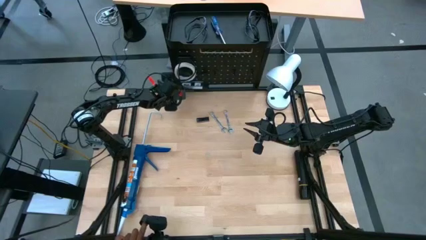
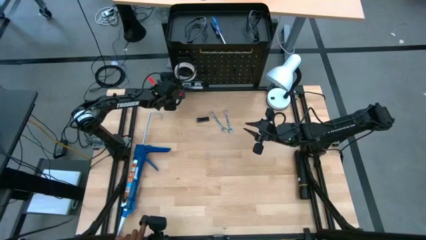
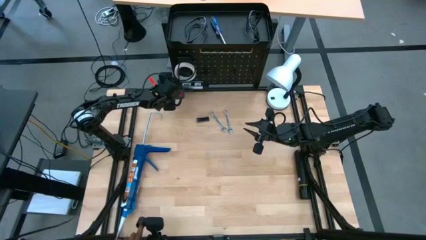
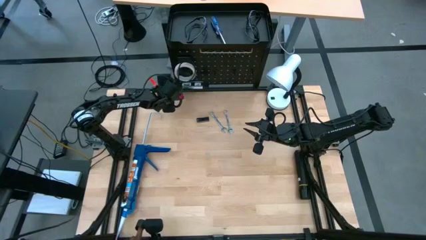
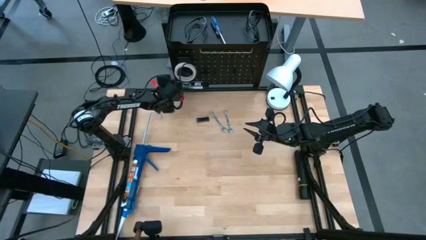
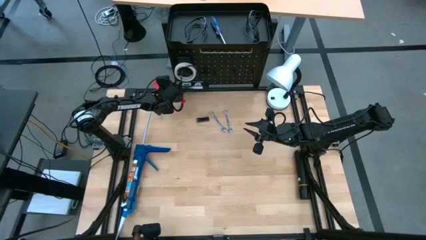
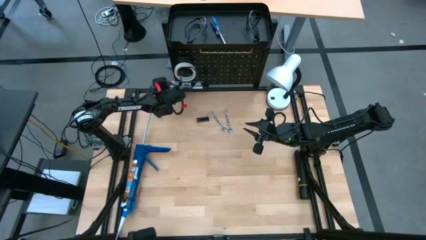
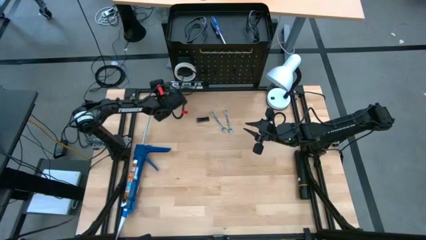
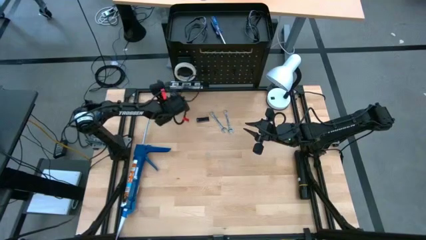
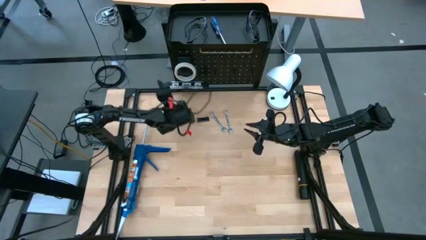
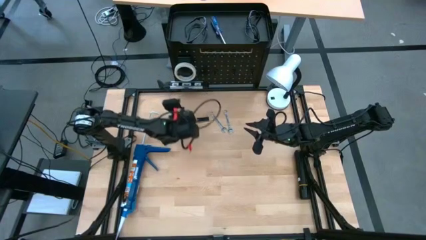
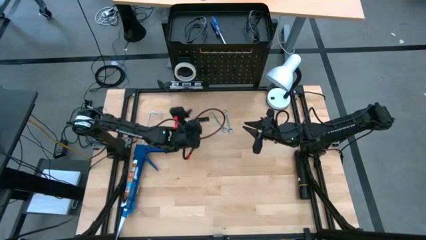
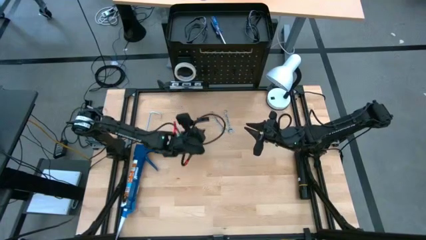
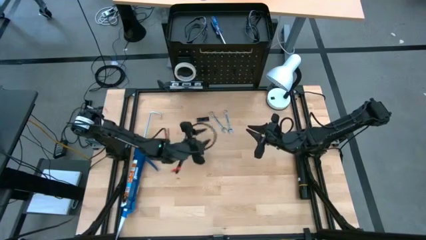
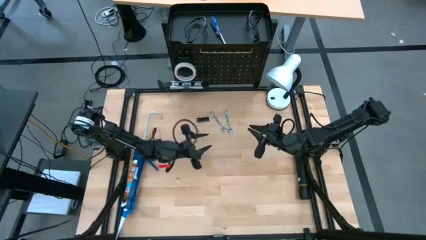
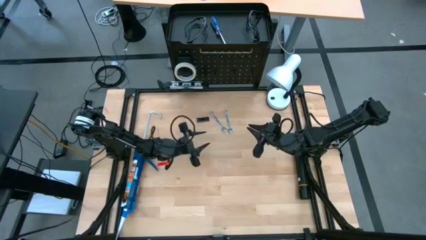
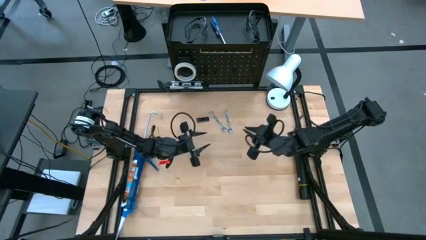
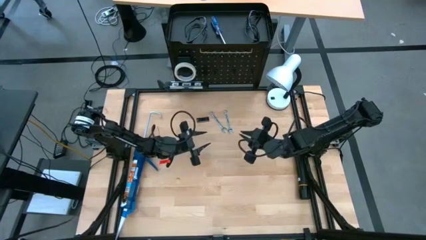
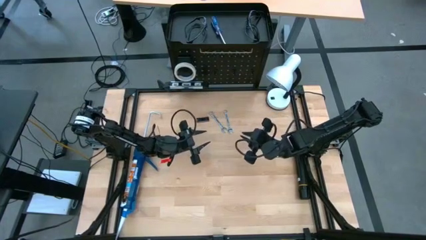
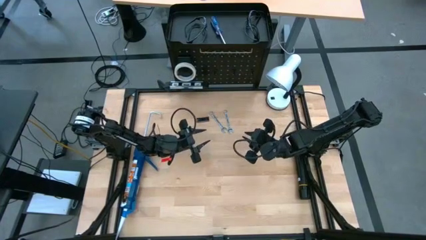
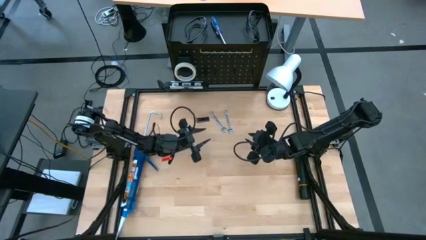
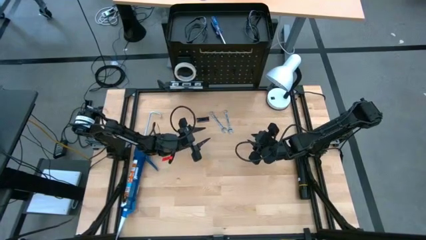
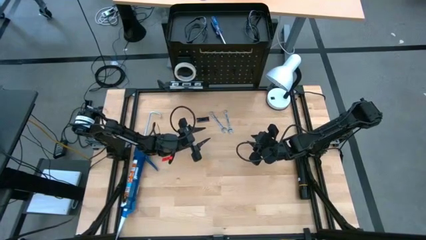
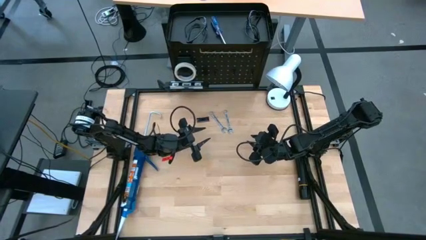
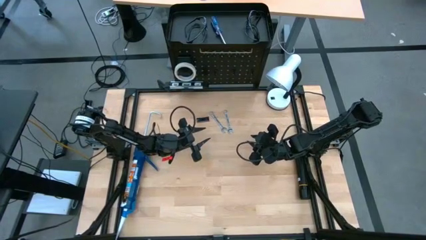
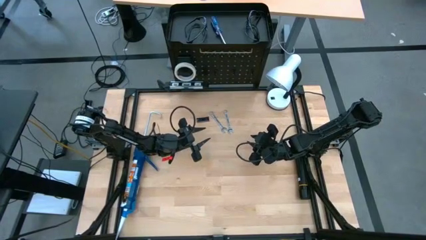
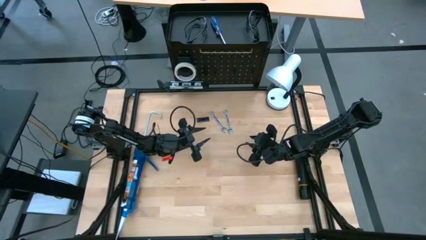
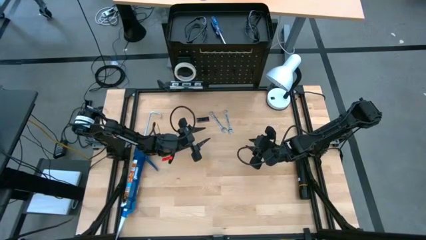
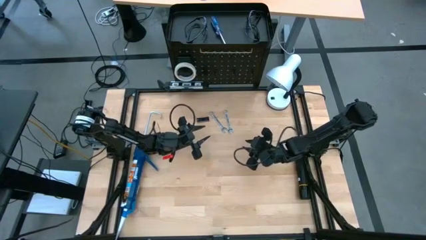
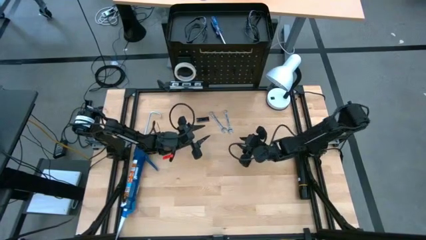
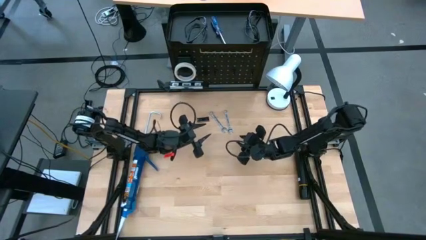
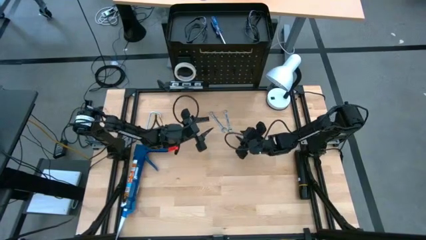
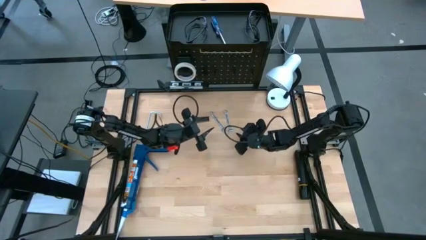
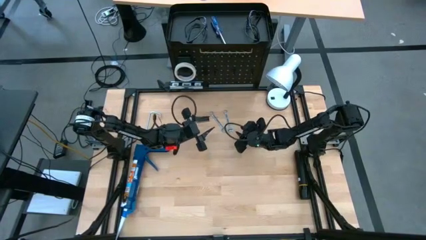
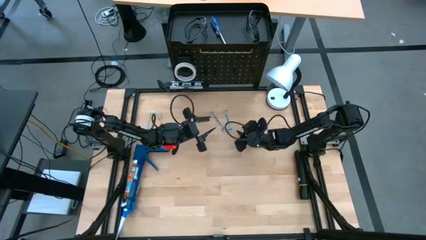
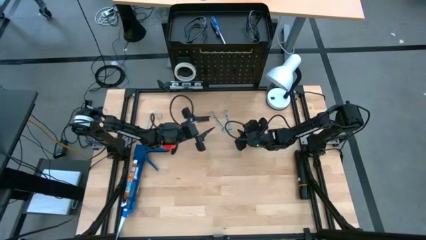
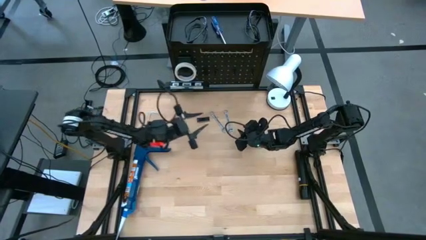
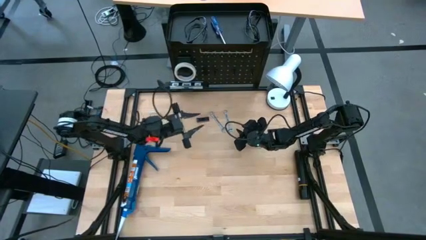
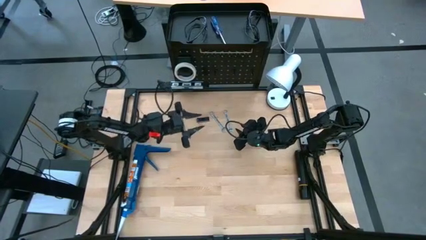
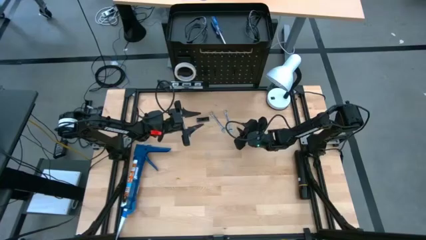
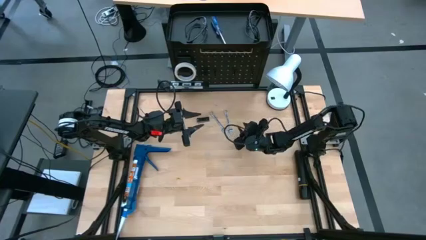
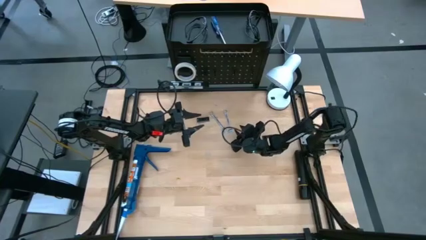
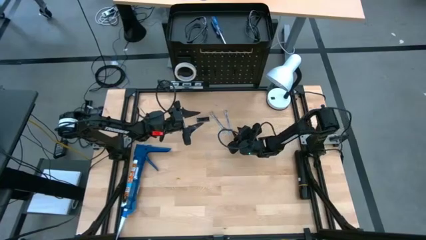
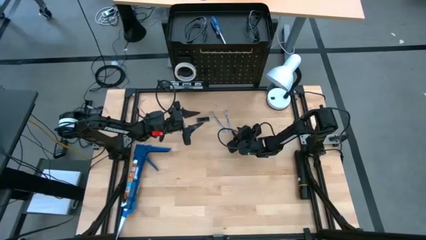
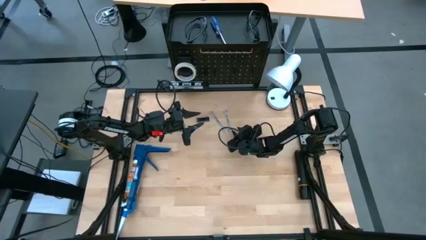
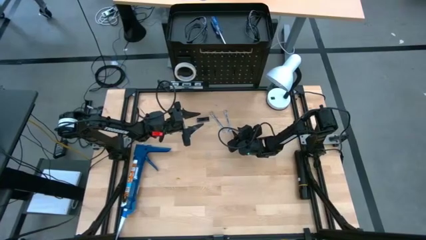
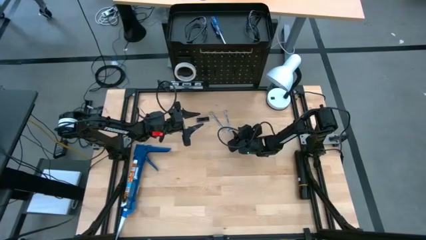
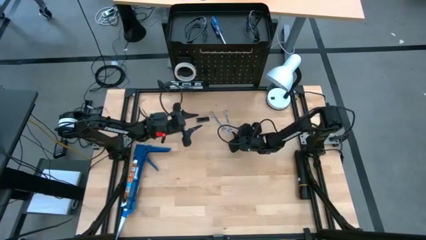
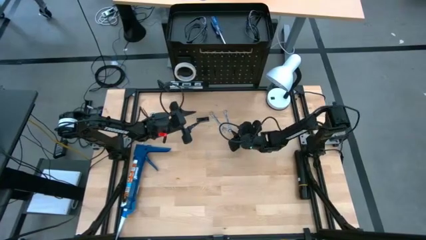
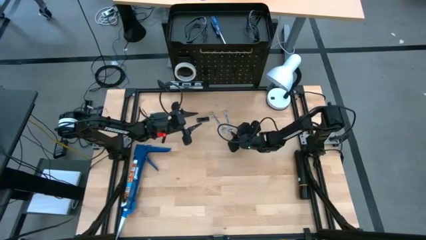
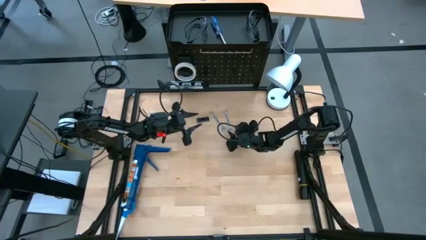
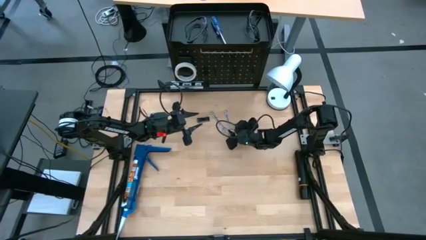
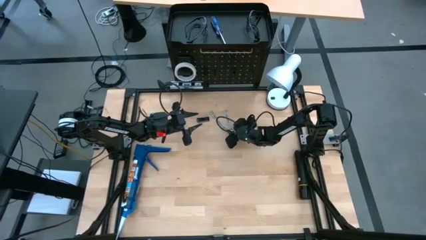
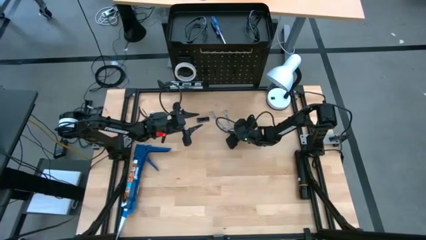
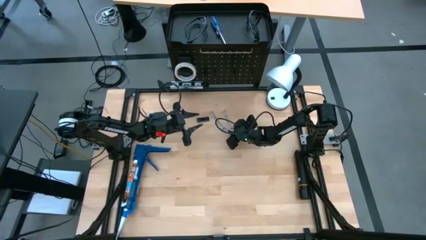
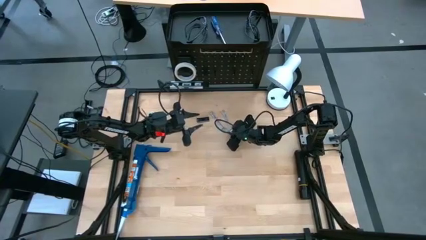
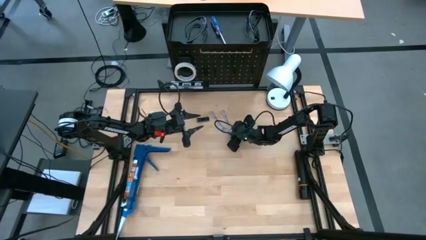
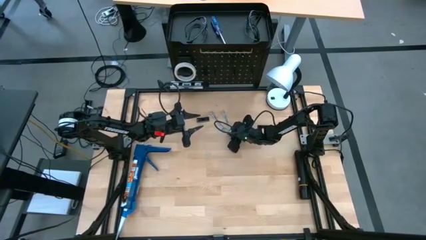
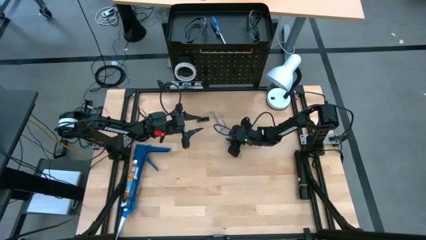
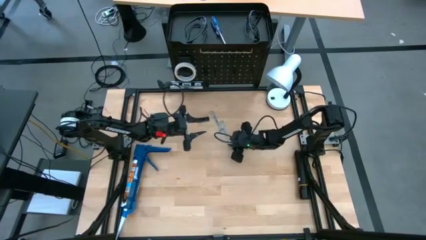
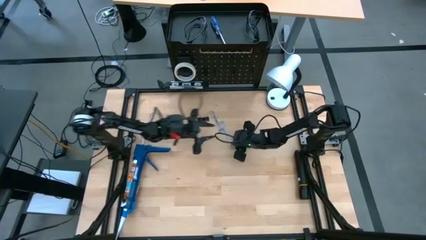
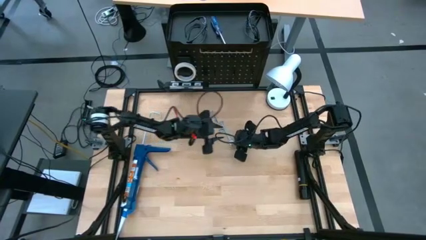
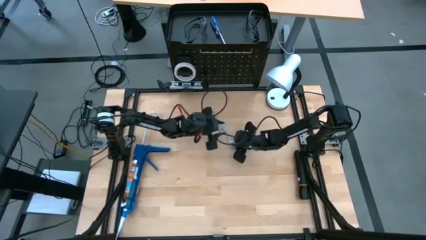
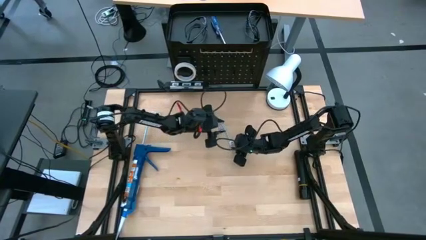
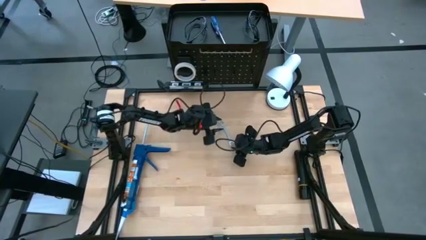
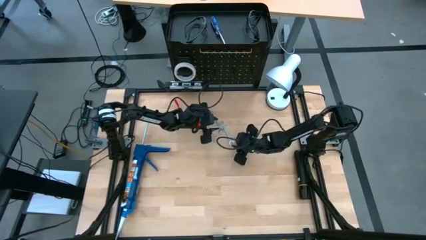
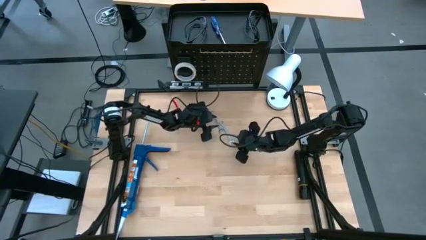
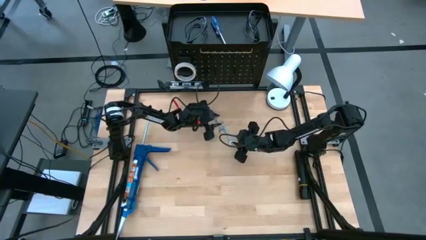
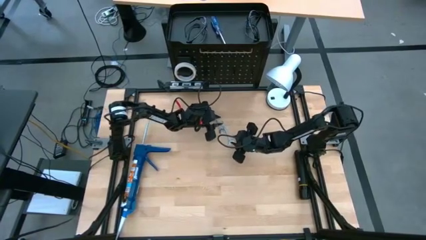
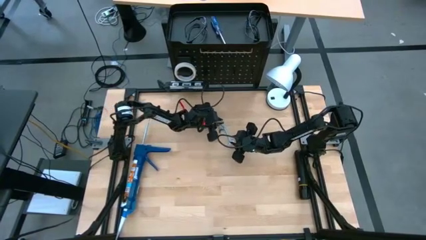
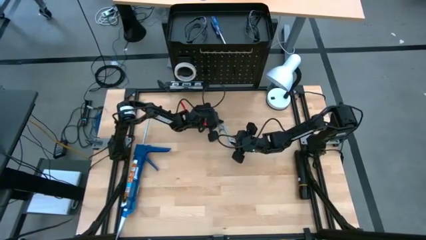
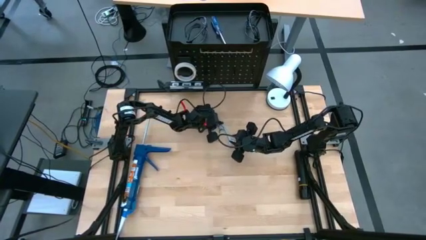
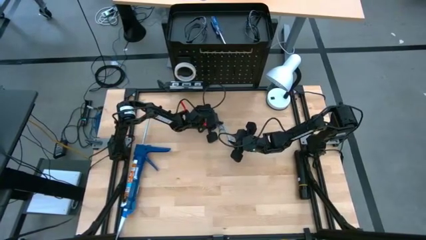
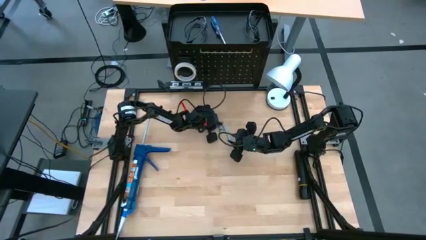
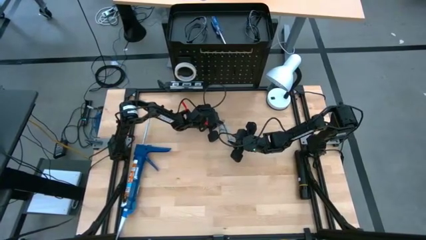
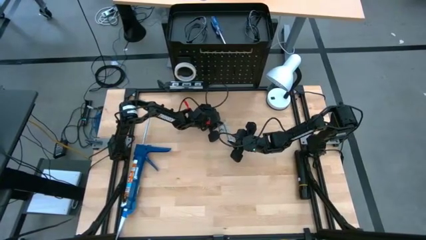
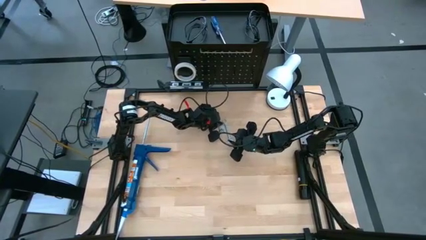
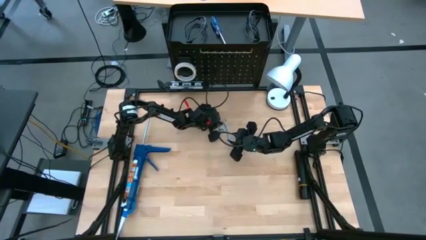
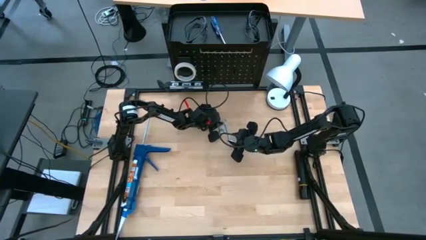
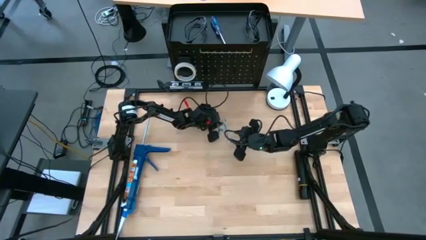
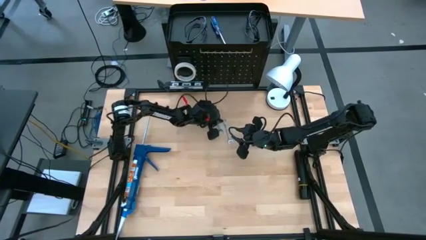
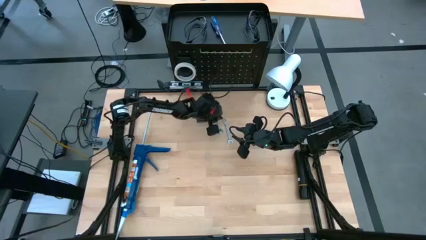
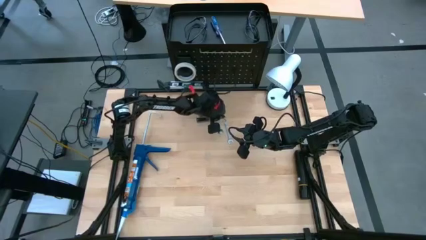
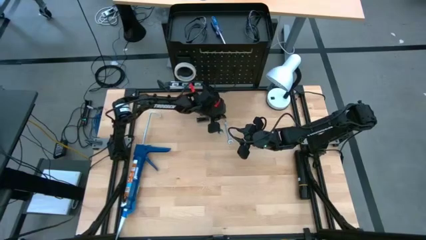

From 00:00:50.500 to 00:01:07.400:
Task: Hang tools onto peg board
Hang the right wrench on the pegboard
